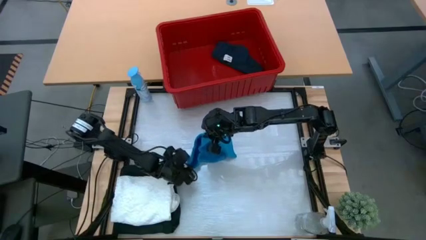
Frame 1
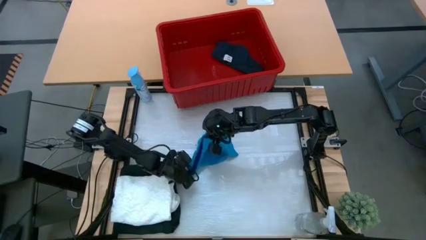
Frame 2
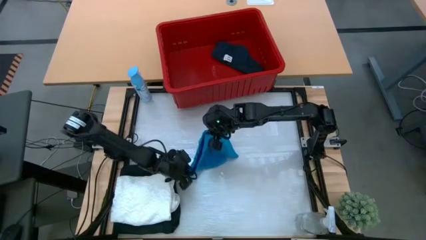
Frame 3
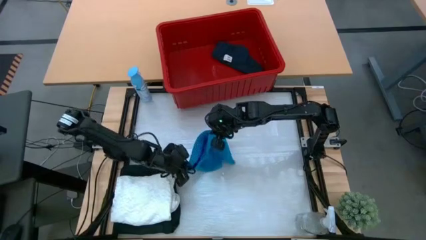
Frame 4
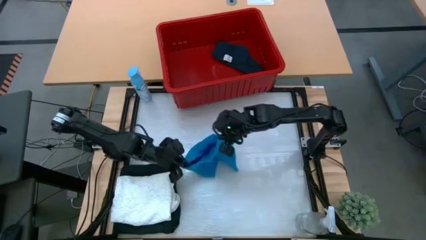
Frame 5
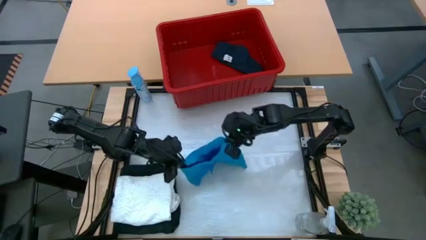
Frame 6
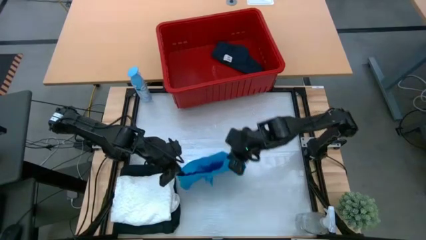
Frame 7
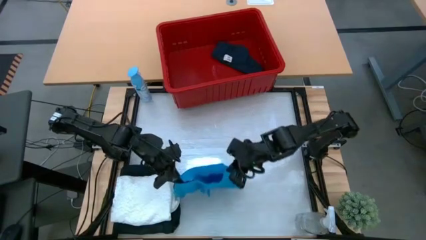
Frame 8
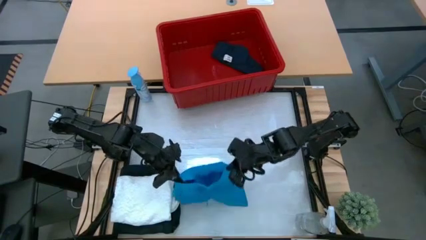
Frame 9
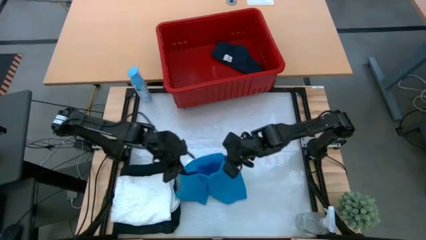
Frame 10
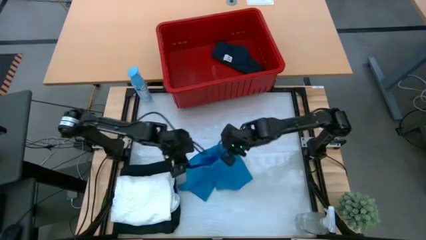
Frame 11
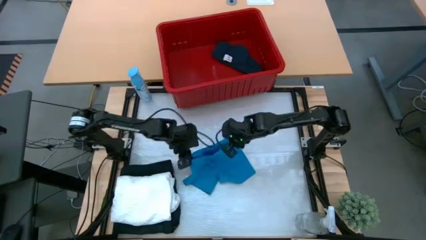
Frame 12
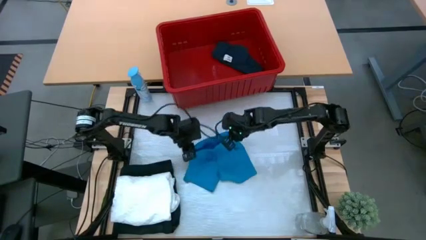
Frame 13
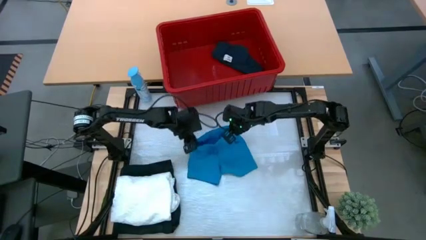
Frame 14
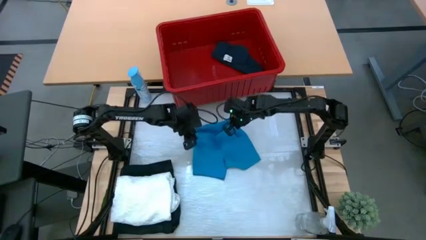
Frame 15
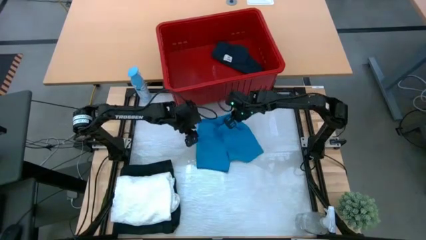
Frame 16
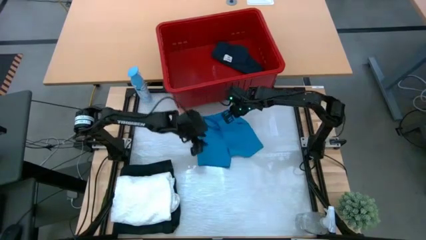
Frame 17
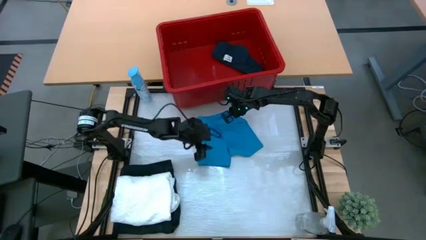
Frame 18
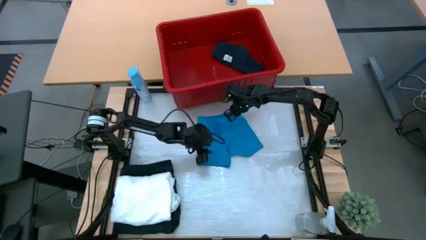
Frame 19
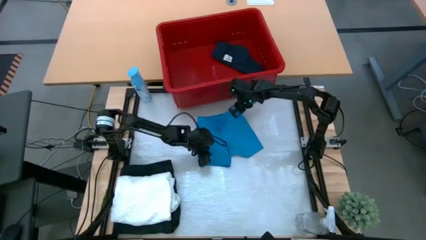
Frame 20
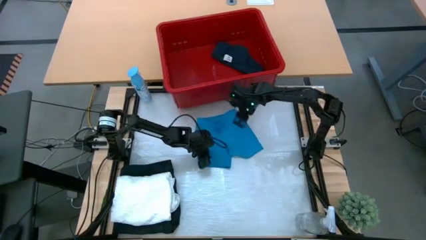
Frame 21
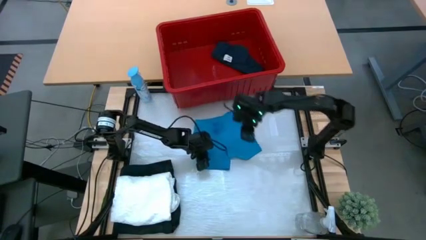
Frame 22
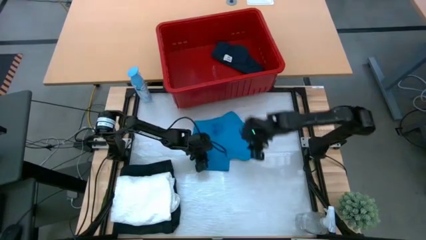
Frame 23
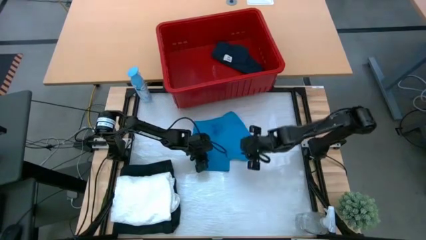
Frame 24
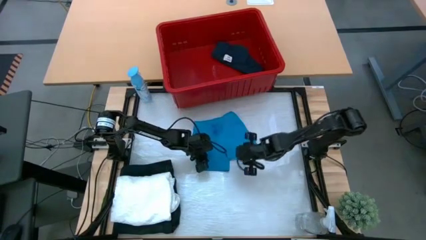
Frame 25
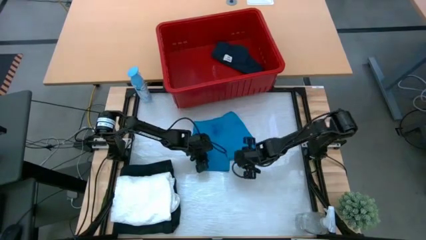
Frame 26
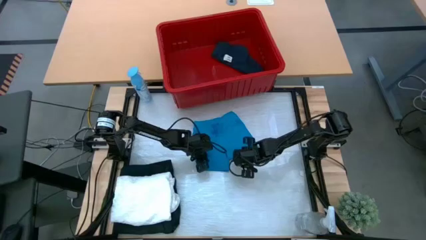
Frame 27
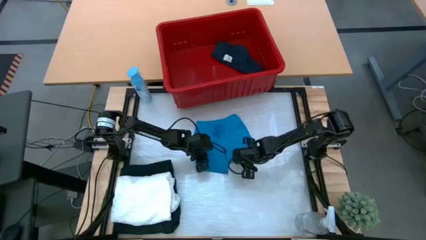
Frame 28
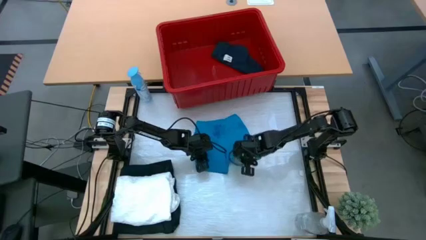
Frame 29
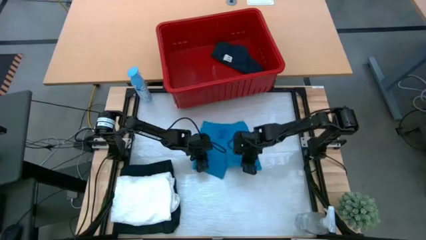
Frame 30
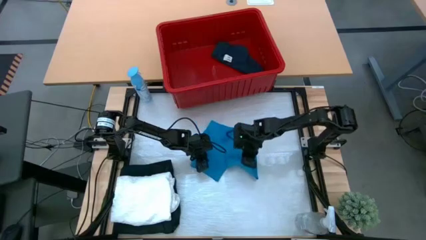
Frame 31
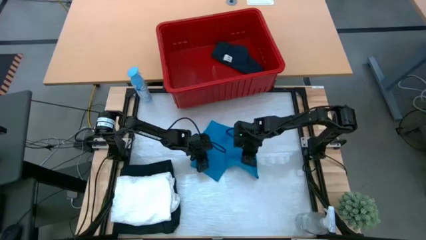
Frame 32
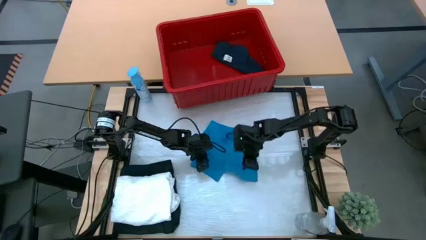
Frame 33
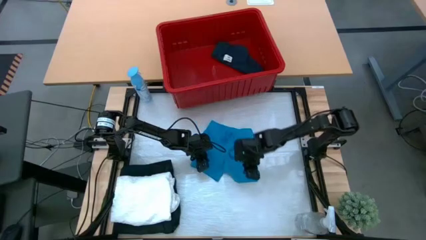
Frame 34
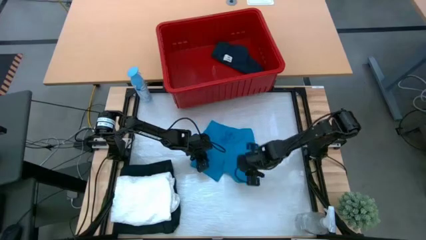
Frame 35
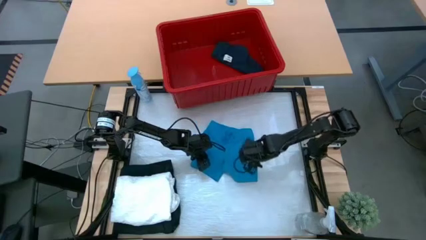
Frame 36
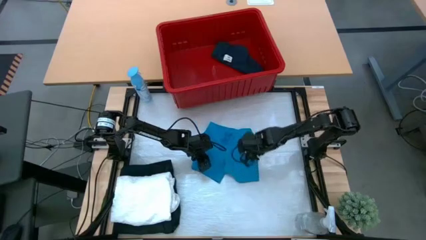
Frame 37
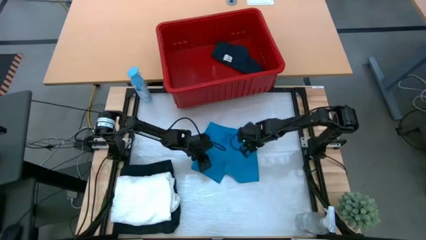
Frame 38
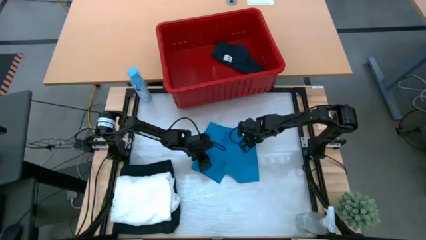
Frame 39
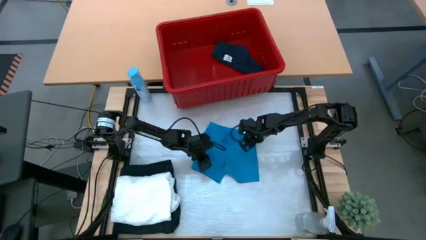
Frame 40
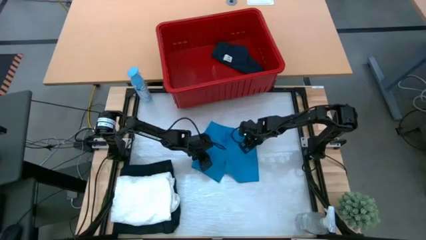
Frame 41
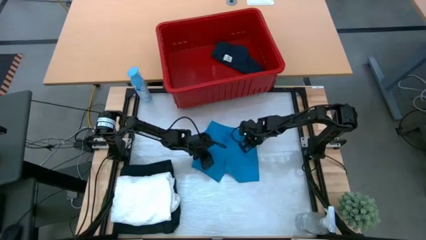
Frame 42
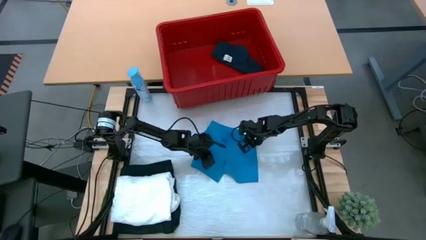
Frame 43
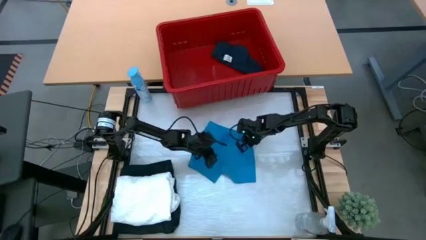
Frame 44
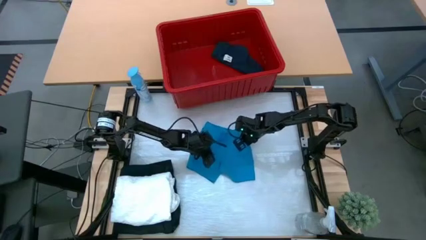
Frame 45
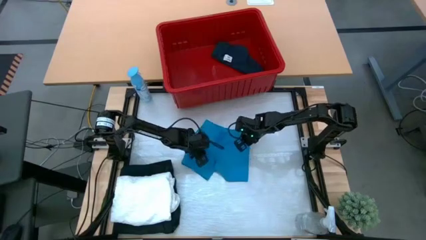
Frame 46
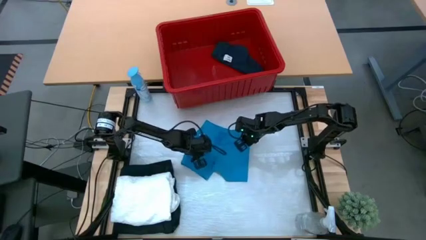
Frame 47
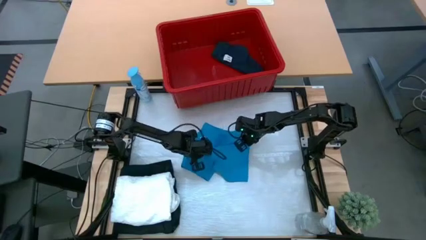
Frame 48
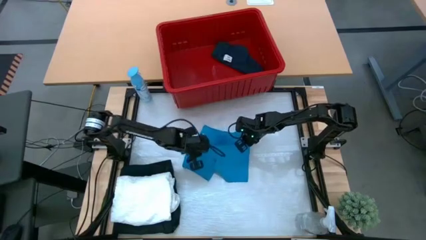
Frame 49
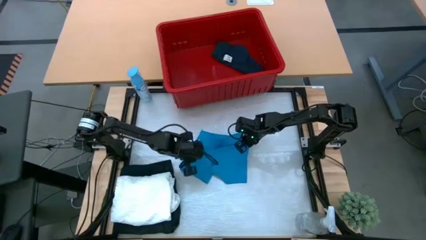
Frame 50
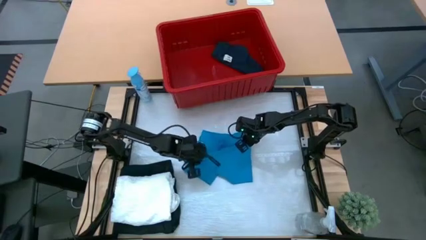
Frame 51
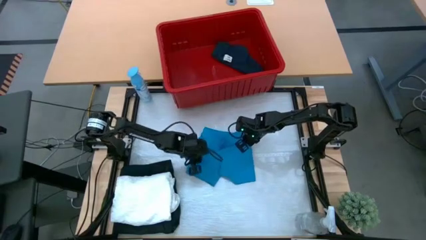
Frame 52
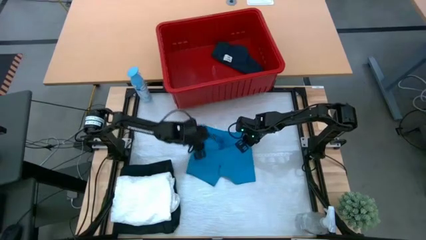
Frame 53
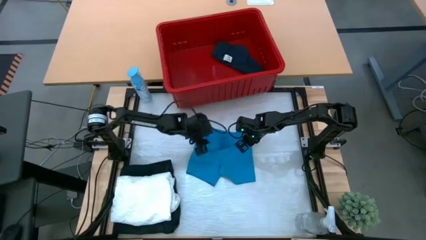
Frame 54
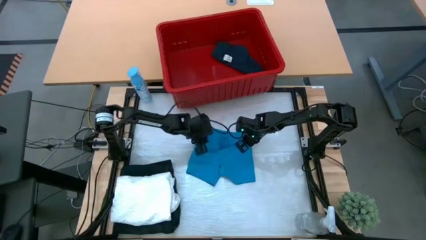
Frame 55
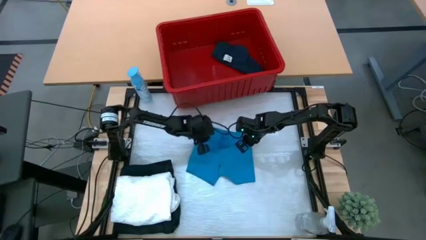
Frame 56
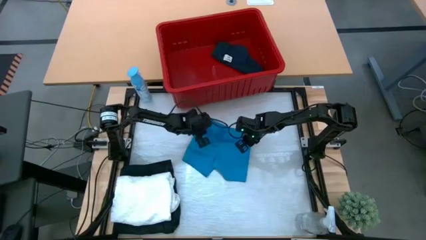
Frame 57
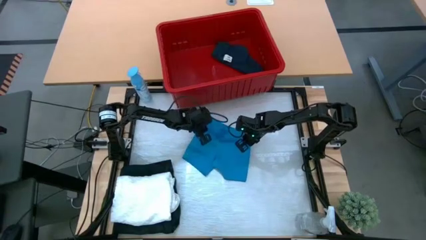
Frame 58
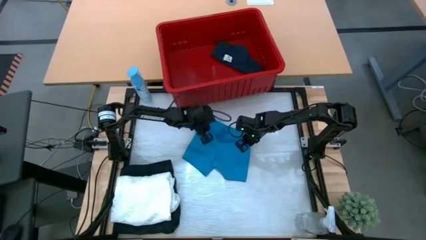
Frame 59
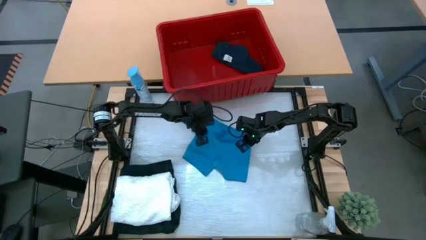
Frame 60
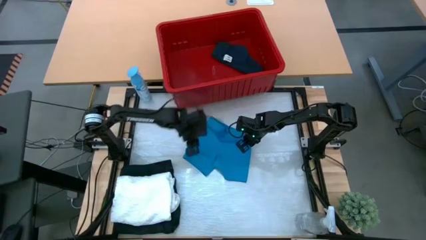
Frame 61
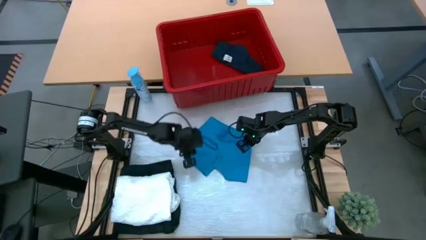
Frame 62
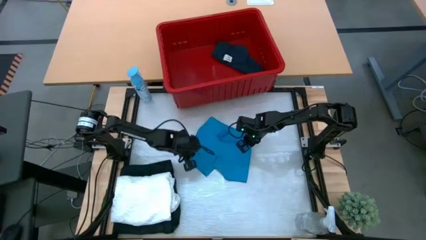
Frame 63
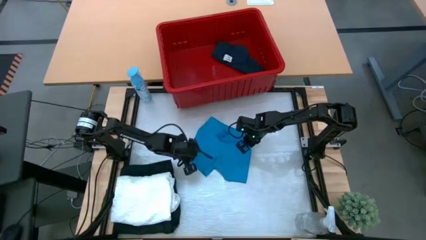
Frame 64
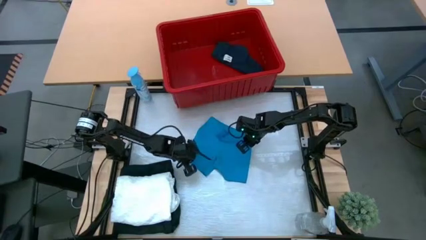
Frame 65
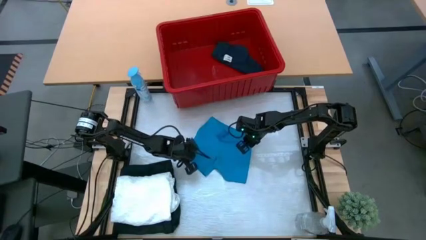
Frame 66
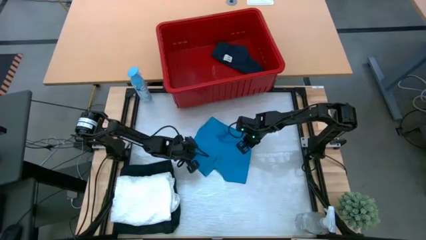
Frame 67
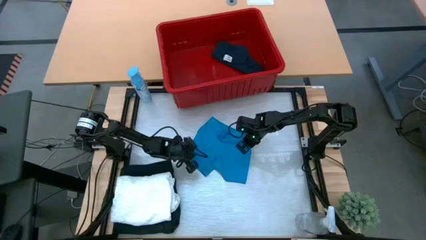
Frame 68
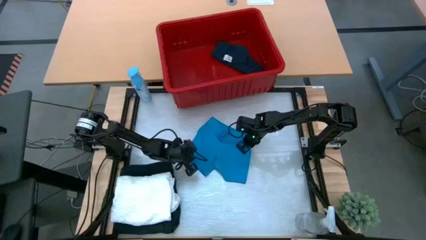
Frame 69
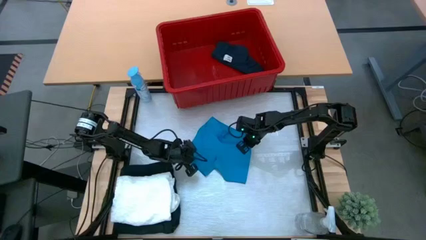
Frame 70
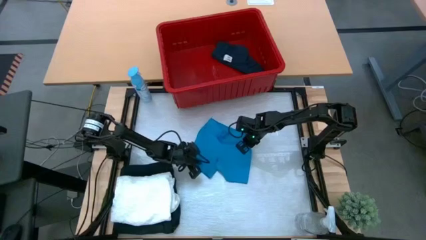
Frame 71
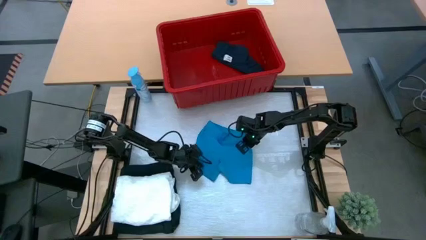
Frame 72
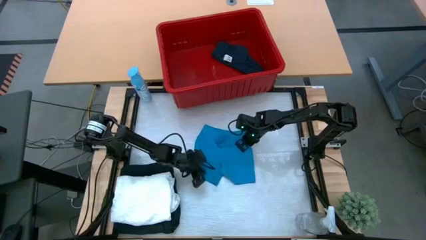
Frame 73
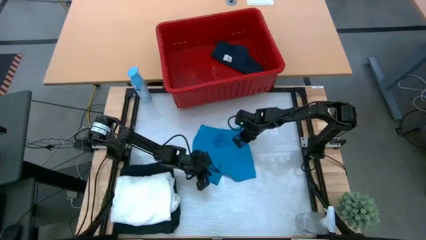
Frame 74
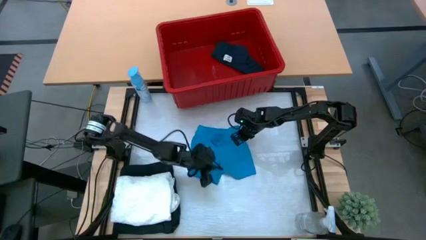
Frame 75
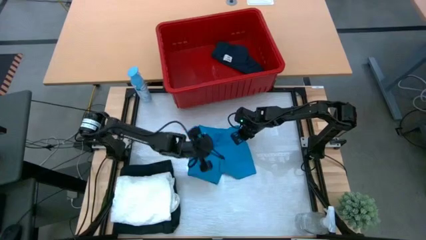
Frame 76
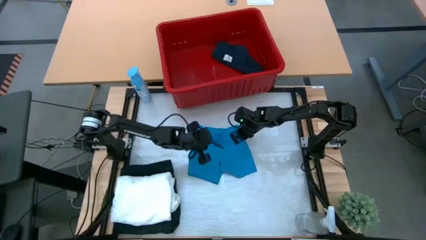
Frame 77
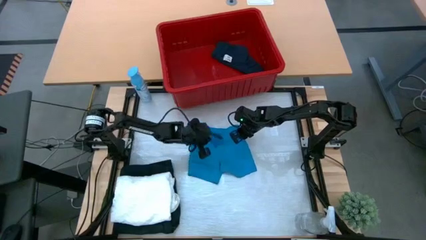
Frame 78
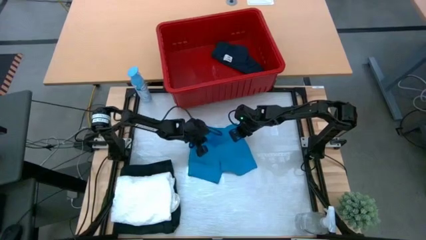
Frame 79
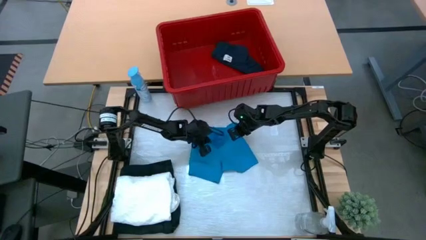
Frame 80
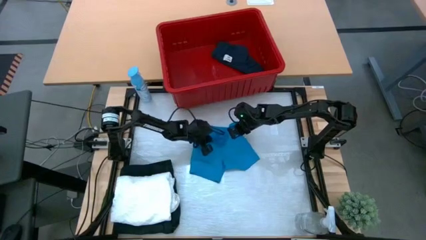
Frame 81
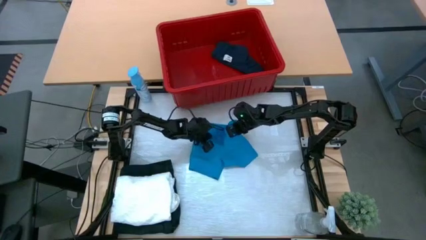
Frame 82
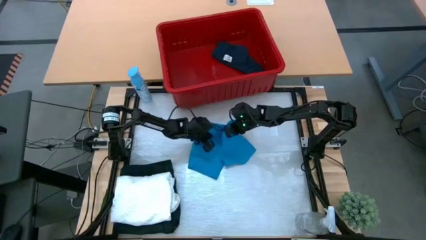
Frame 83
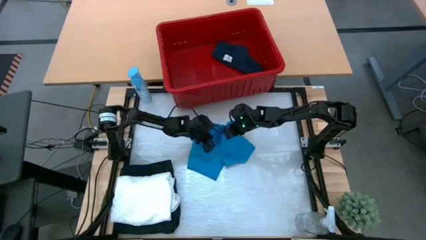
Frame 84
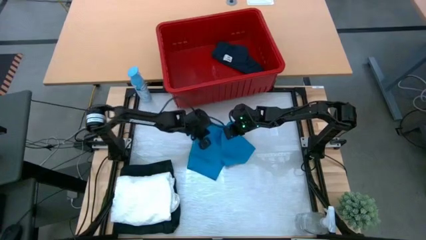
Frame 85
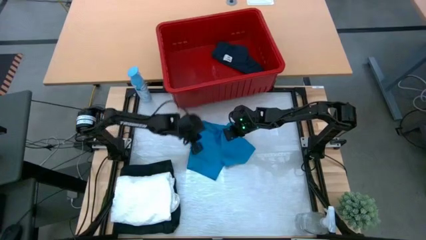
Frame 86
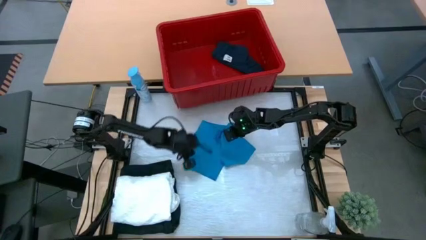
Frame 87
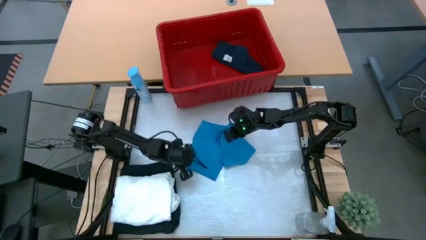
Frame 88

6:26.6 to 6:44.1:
Task: Fold Laundry from Bin
Fold the blue shorts from the red bin
